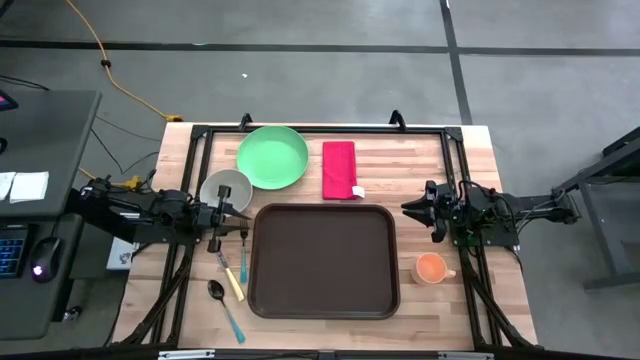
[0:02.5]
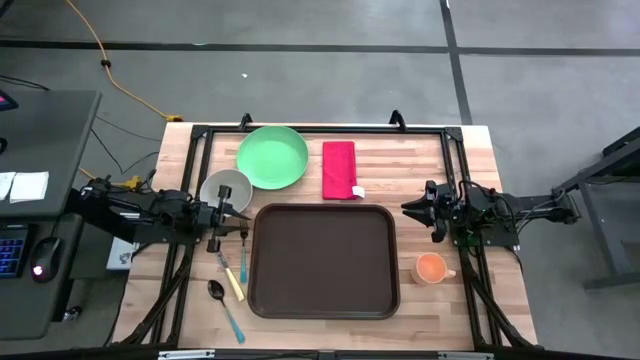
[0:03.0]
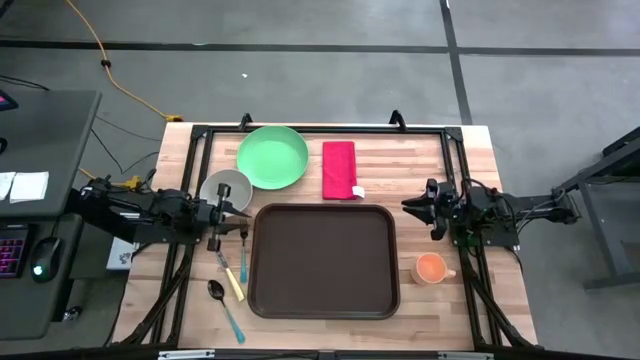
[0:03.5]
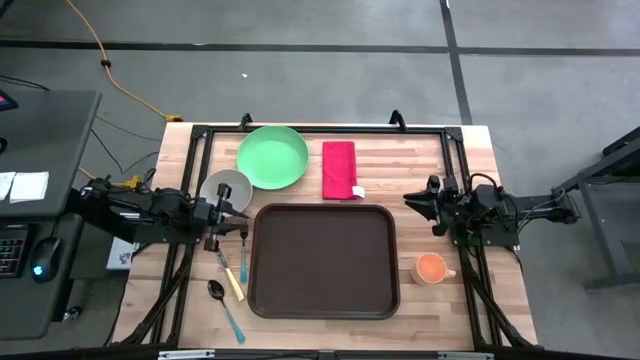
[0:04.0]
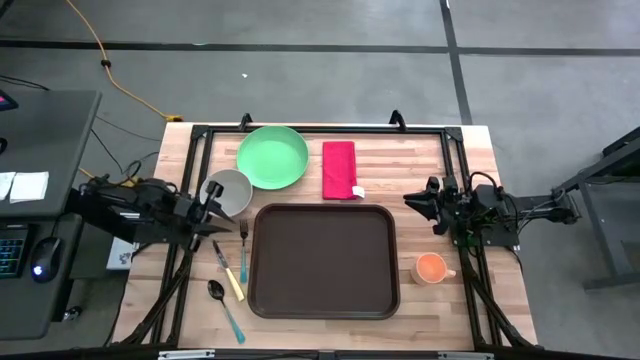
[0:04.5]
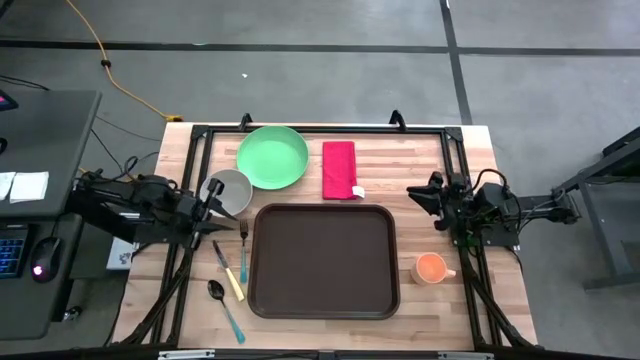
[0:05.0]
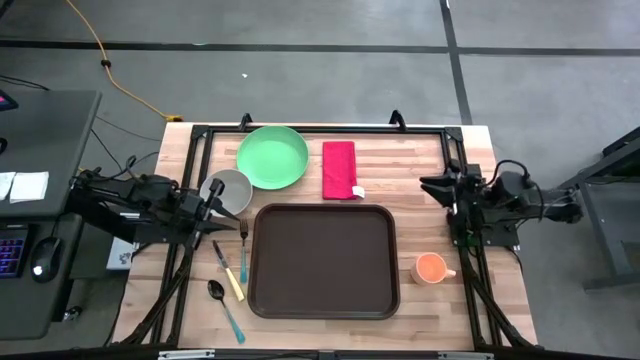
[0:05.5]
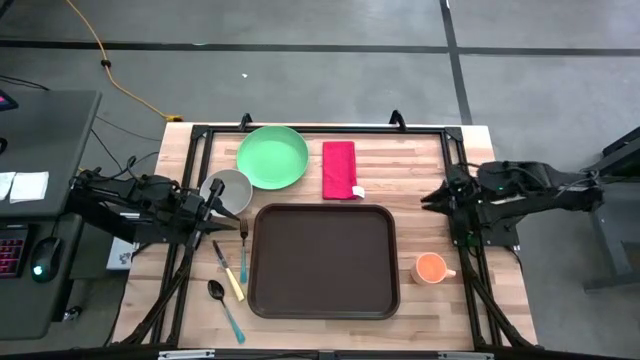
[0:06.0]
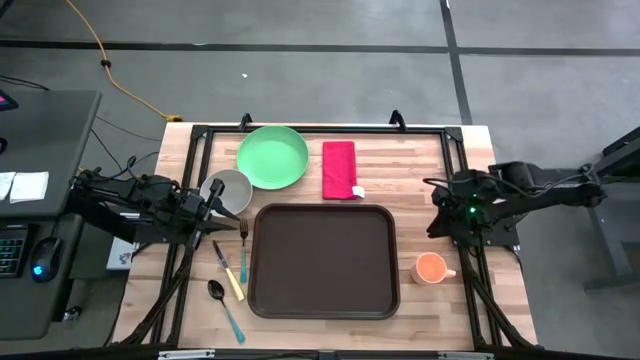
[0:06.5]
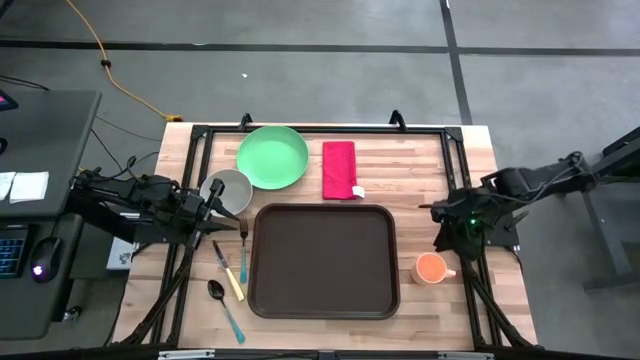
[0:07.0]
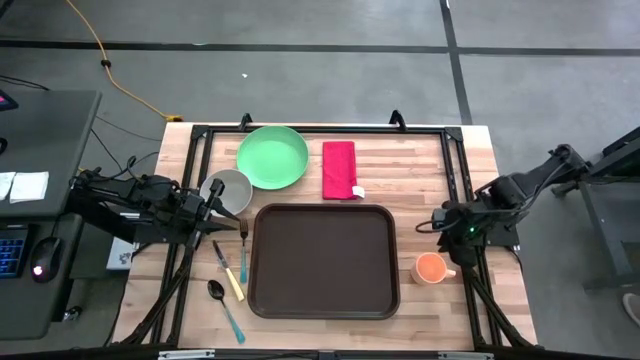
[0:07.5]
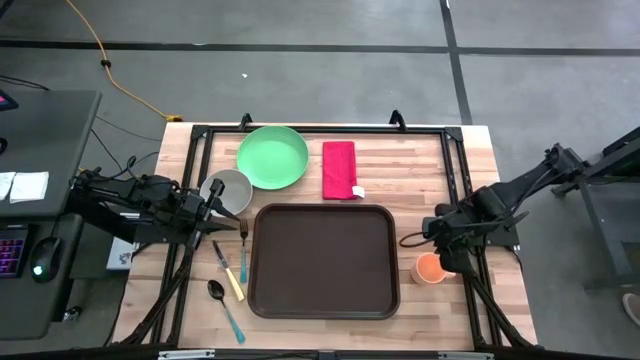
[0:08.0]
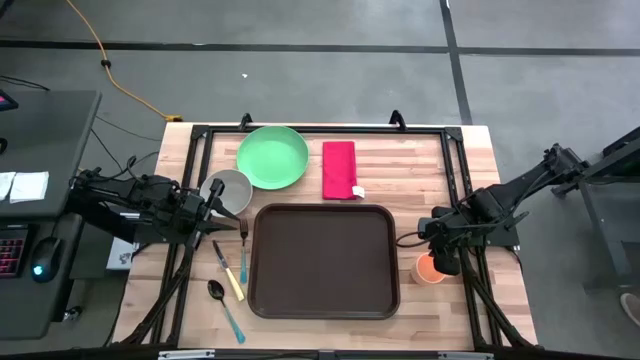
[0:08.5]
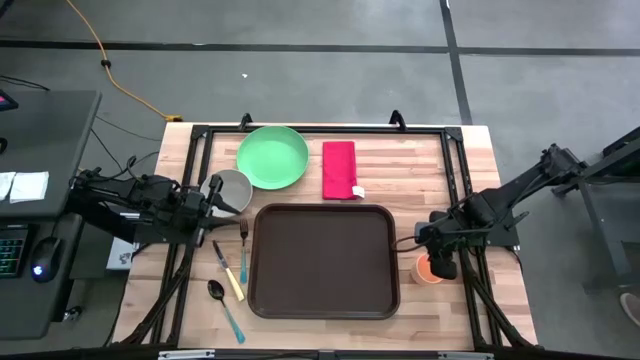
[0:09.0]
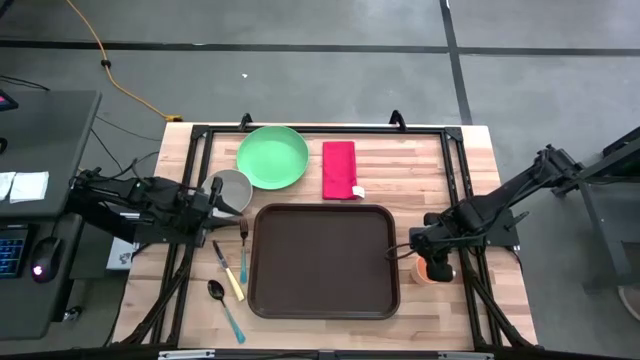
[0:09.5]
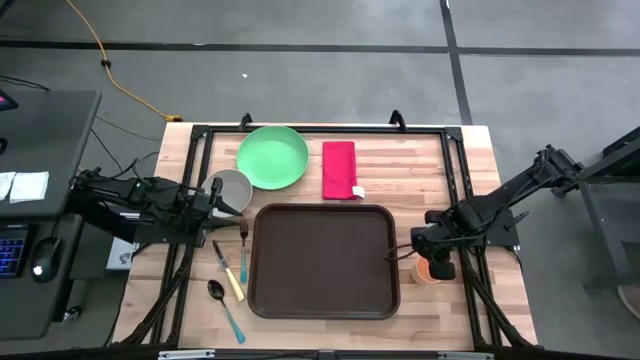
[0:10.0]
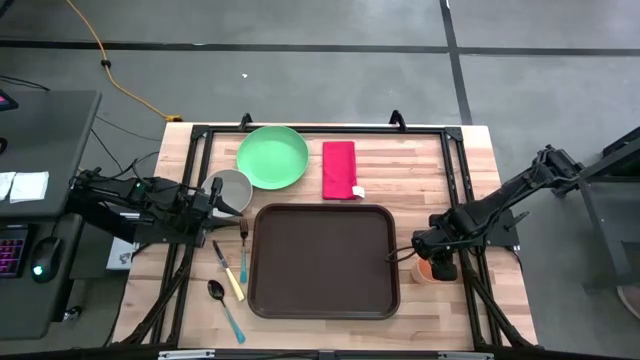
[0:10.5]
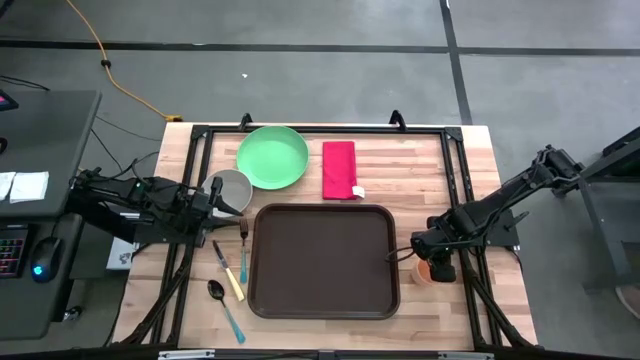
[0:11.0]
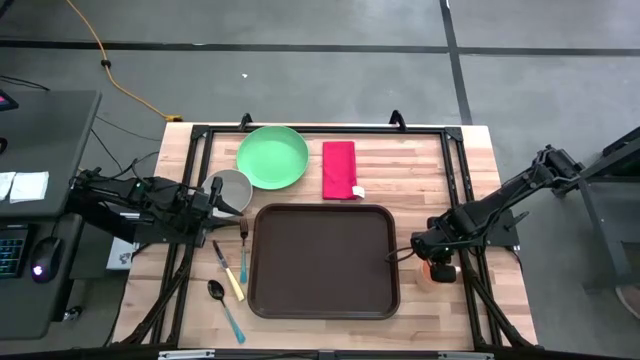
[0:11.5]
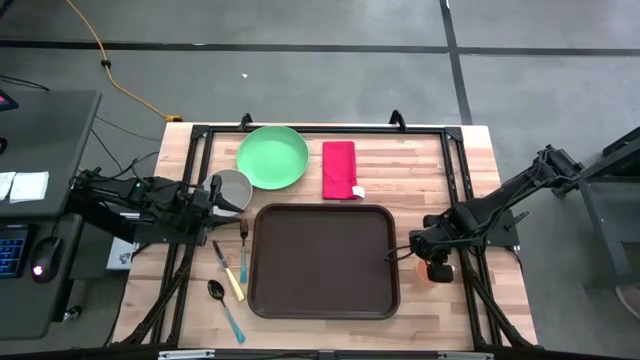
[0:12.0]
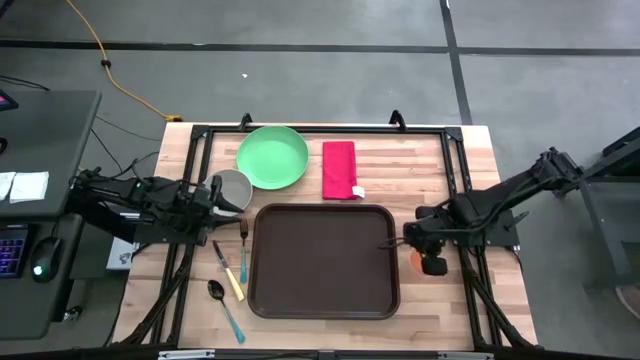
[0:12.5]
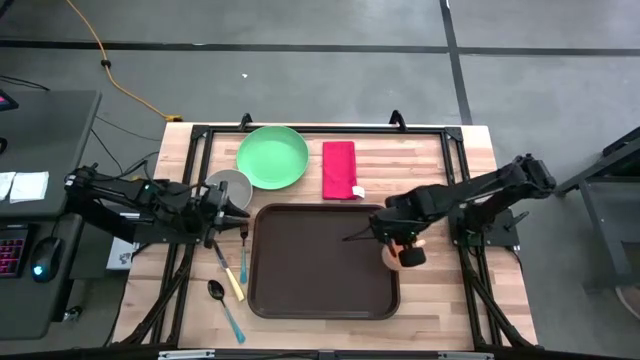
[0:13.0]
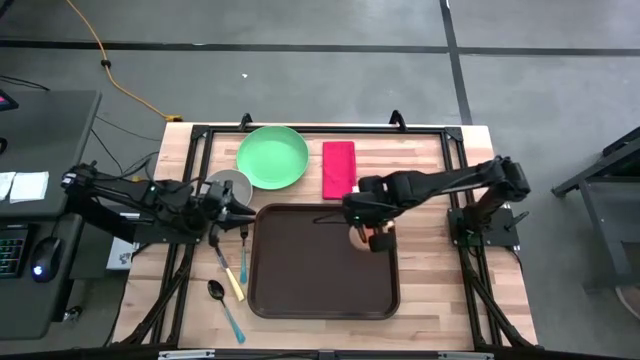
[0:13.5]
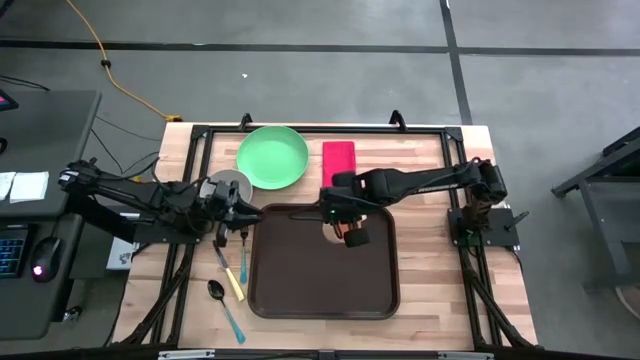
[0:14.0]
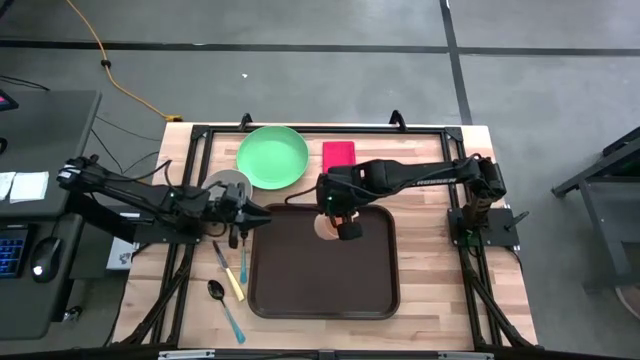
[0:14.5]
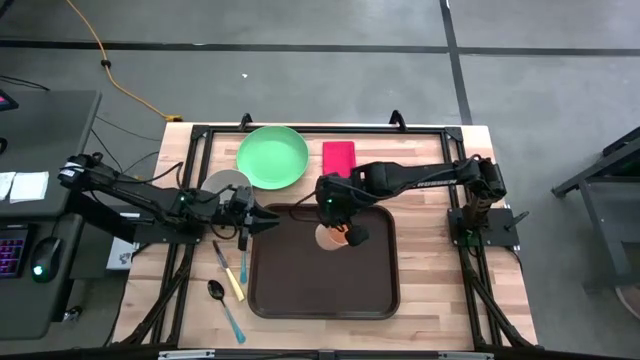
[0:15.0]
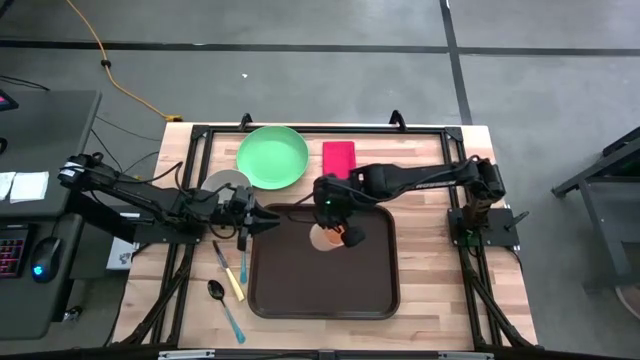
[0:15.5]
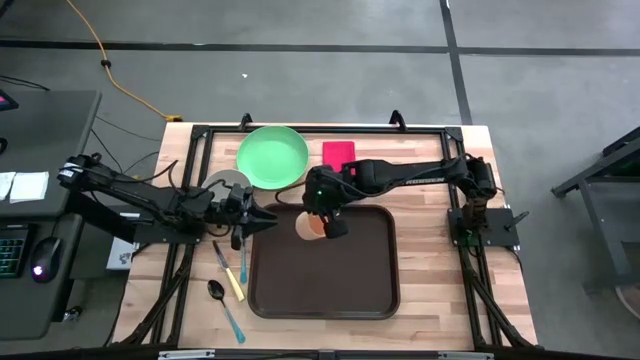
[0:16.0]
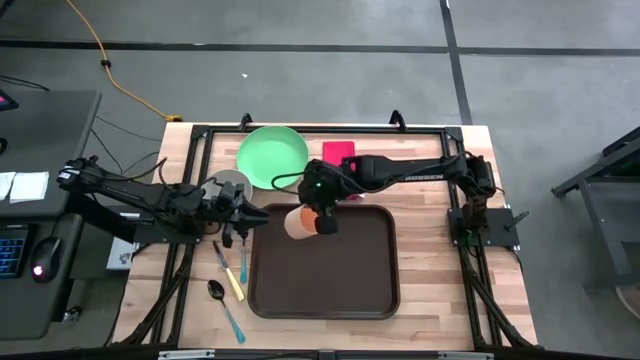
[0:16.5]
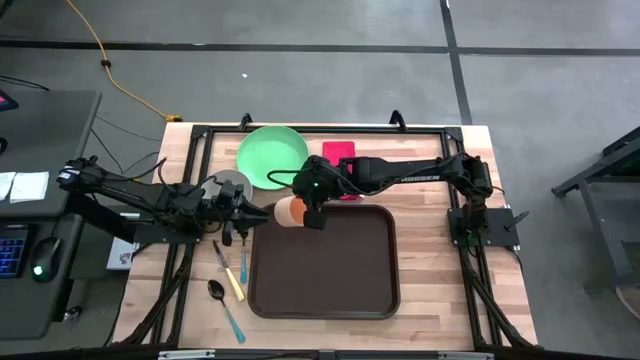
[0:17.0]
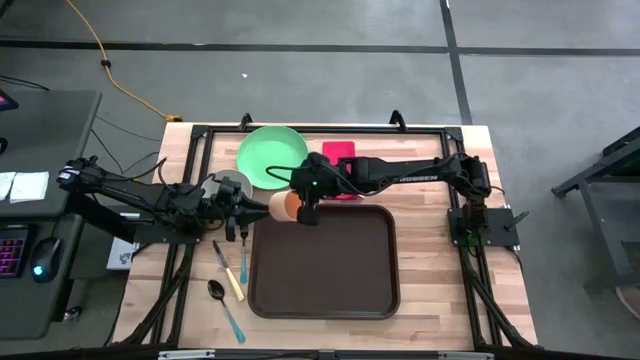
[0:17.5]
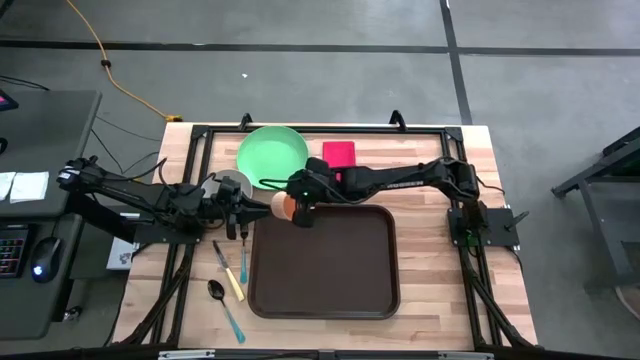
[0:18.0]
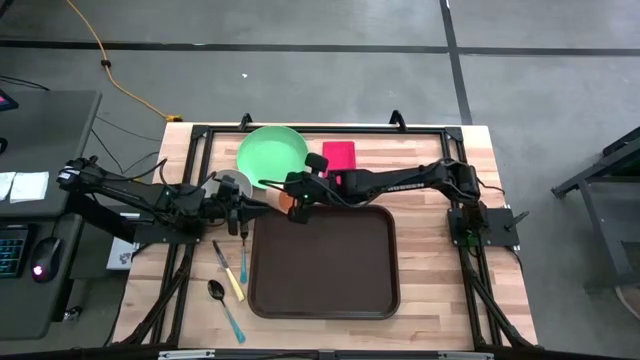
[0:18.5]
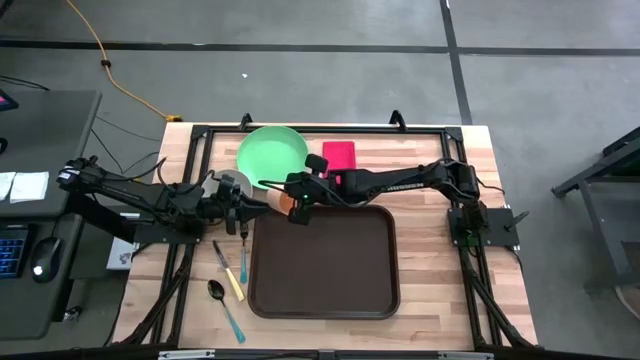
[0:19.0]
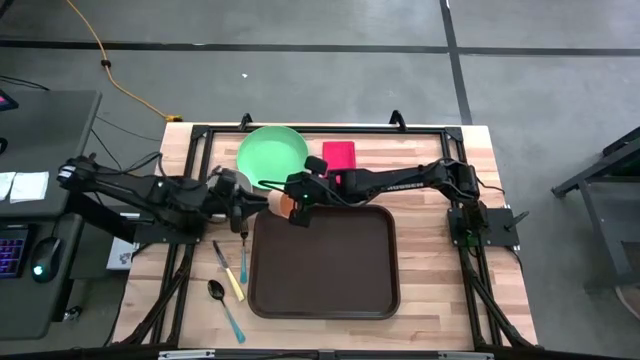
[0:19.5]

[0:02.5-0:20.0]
Task: Set up tray
Put the orange mug on the black serving tray
